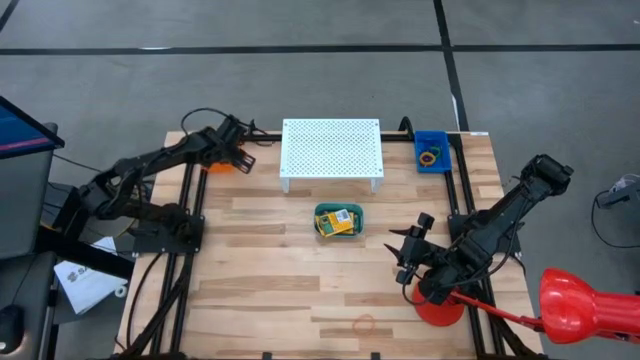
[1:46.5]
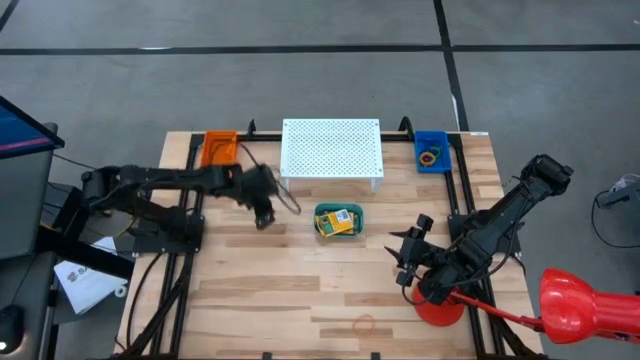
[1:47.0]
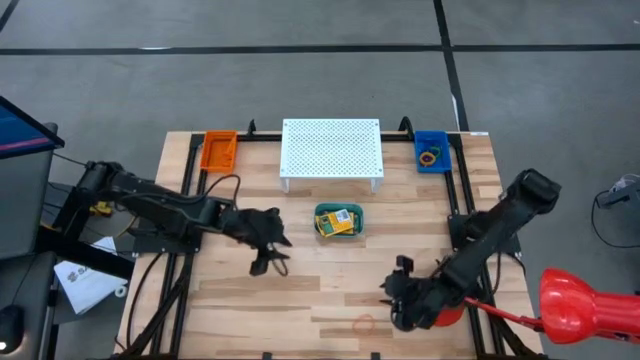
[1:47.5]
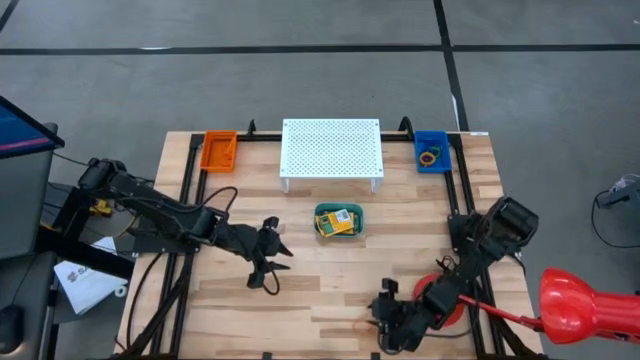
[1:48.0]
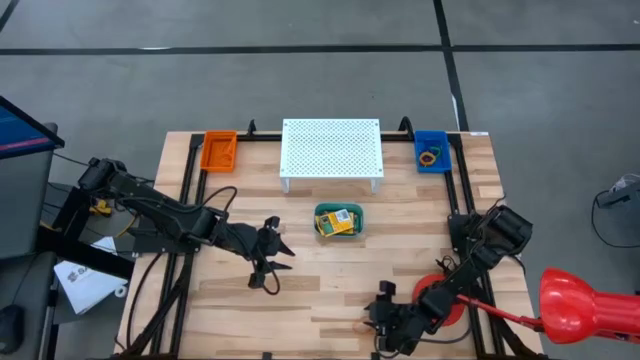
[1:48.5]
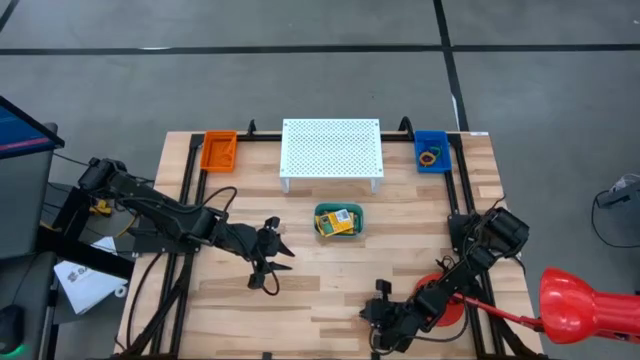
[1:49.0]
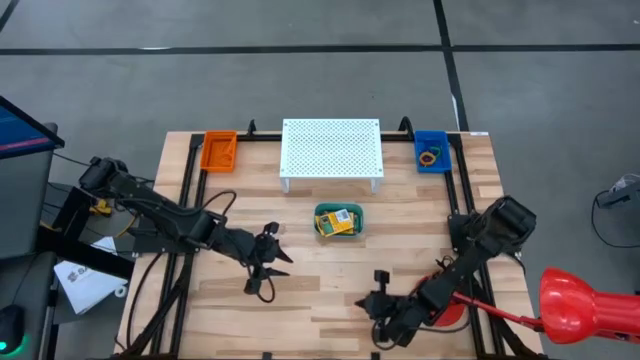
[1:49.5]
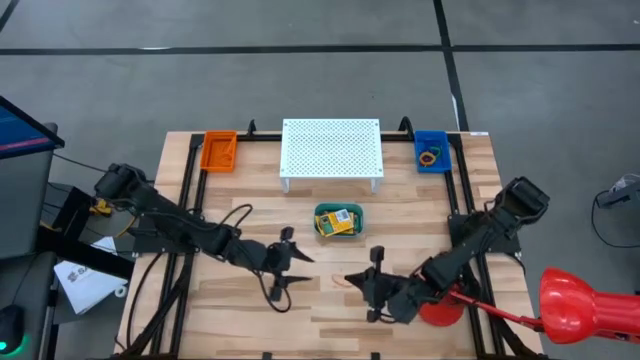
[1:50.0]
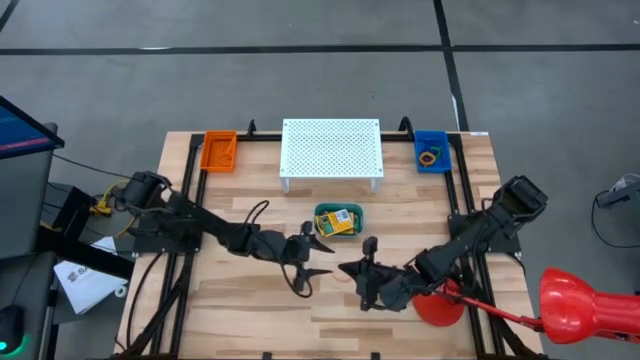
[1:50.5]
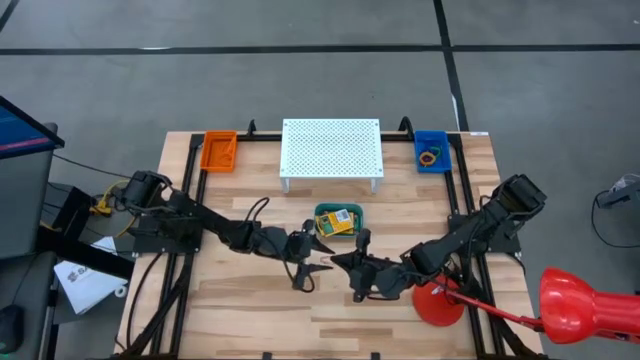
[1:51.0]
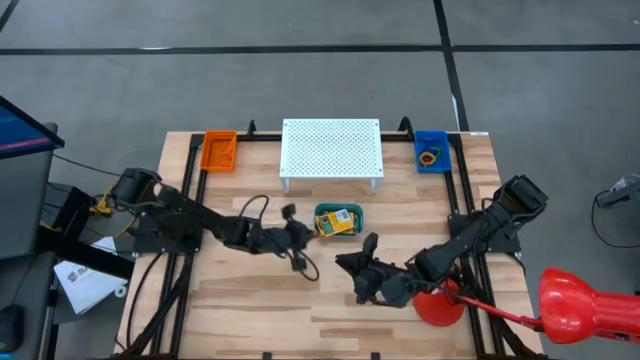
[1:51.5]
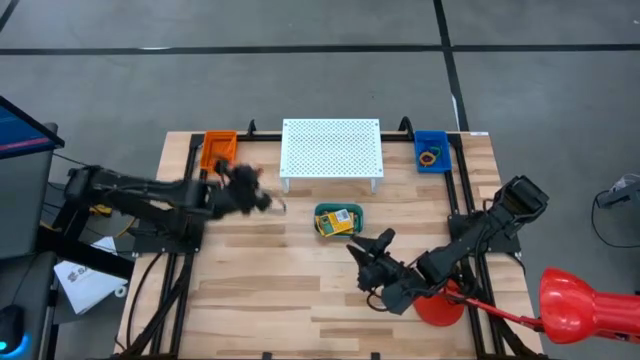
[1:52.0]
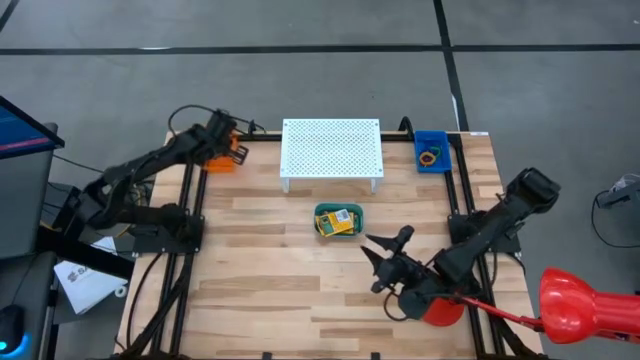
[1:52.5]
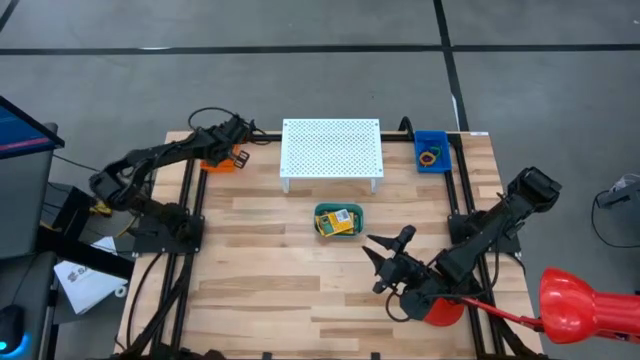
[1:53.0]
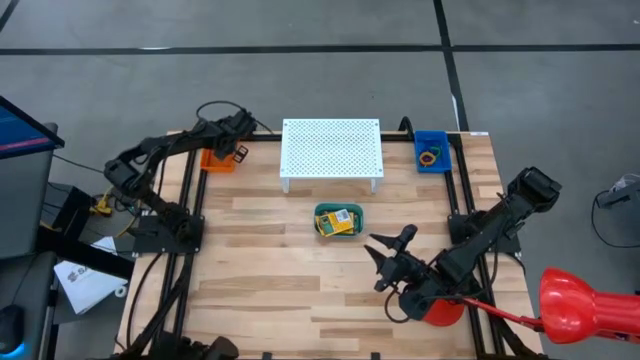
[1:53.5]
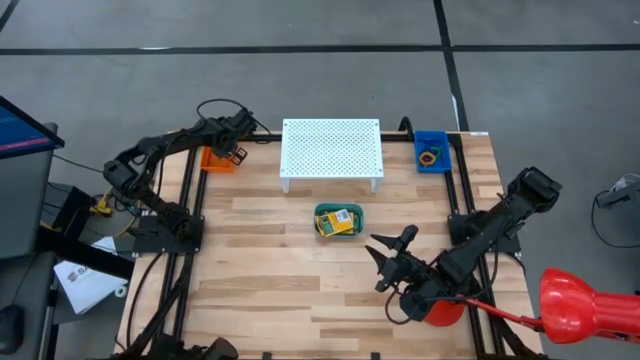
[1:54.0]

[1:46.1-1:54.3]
Task: Pick & Place Office Desk Supplies
Put the orange rubber band into the orange bin

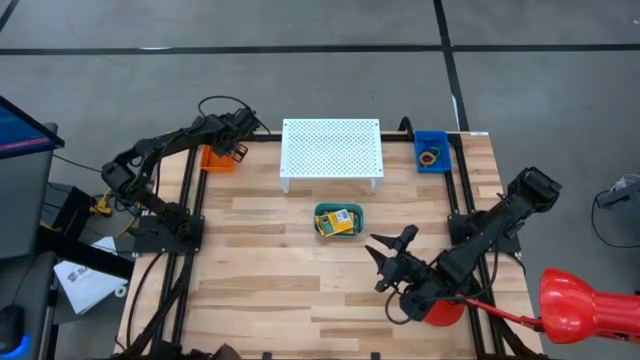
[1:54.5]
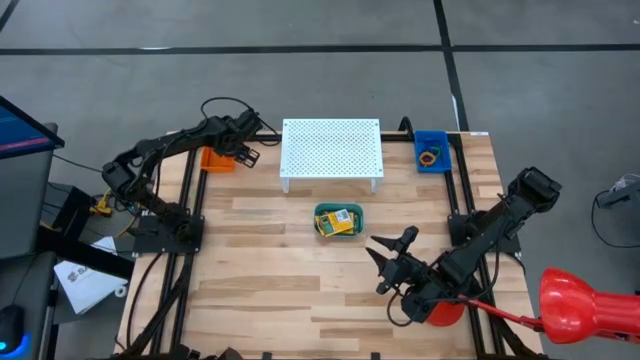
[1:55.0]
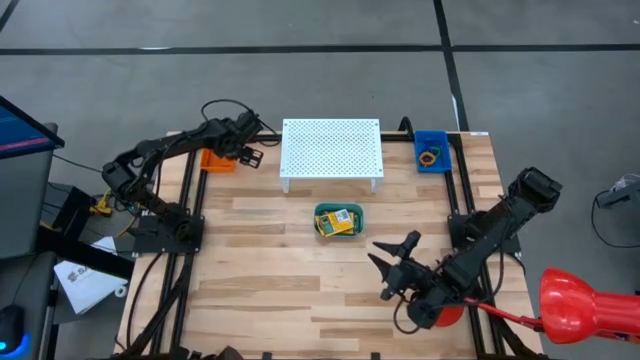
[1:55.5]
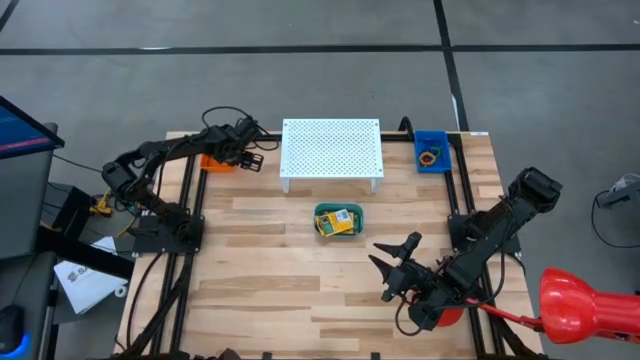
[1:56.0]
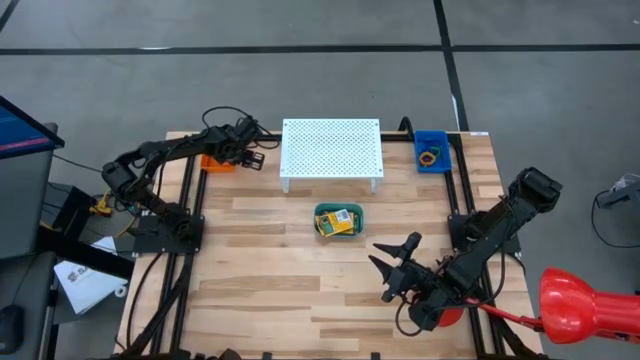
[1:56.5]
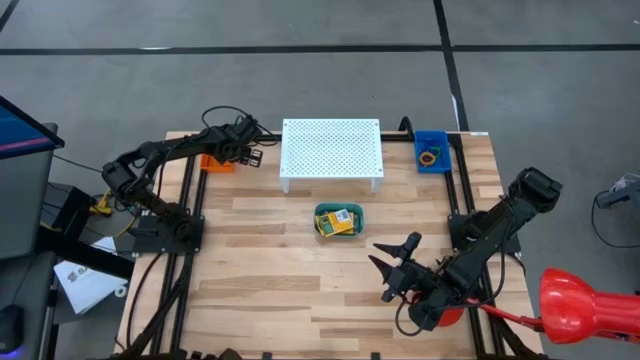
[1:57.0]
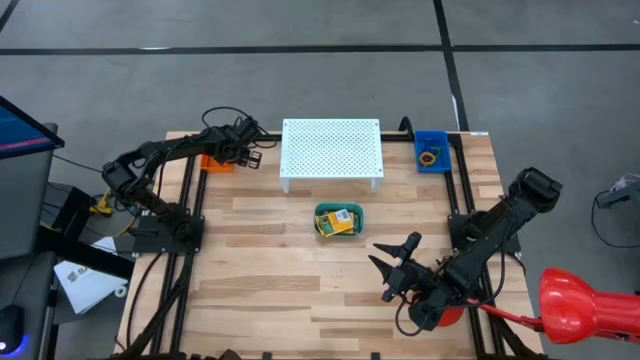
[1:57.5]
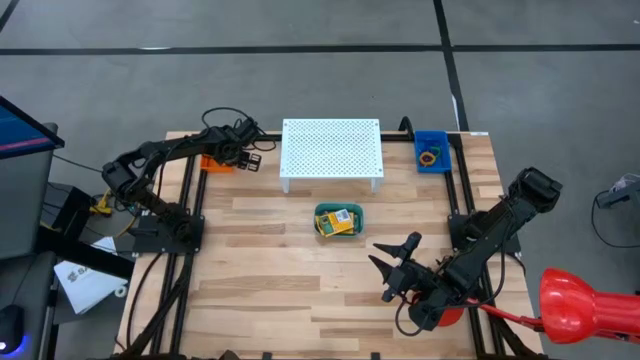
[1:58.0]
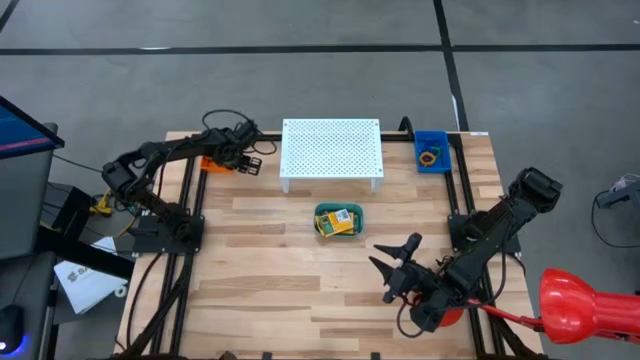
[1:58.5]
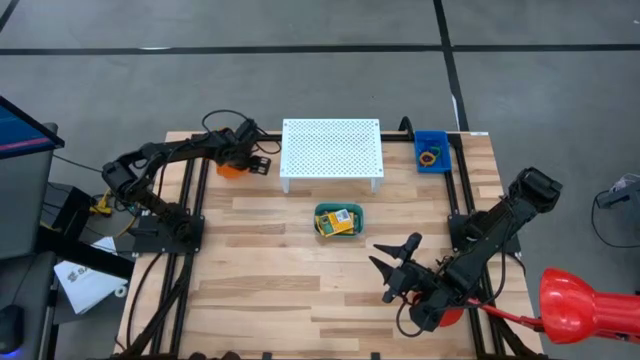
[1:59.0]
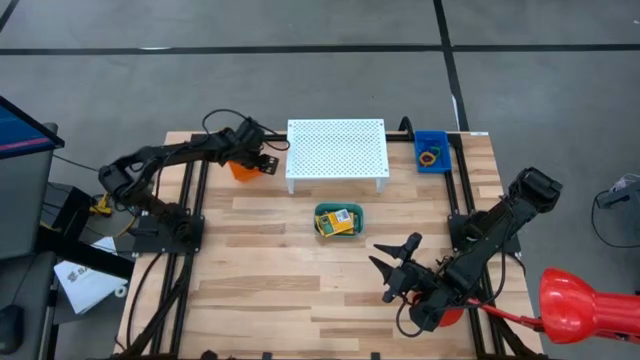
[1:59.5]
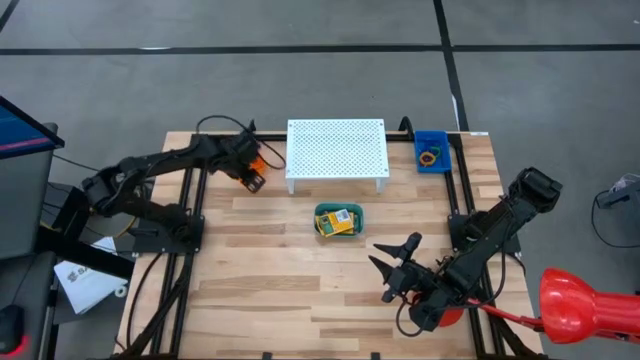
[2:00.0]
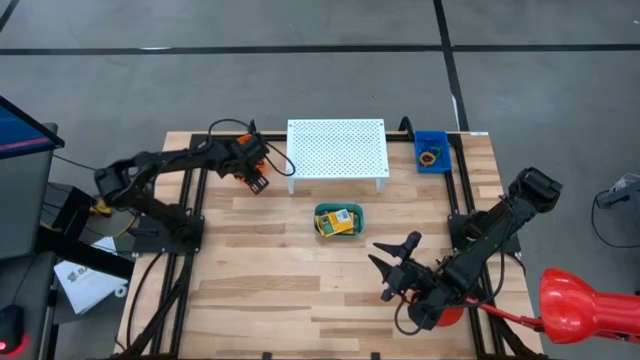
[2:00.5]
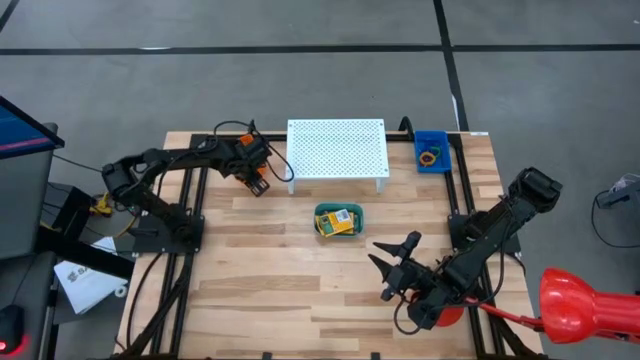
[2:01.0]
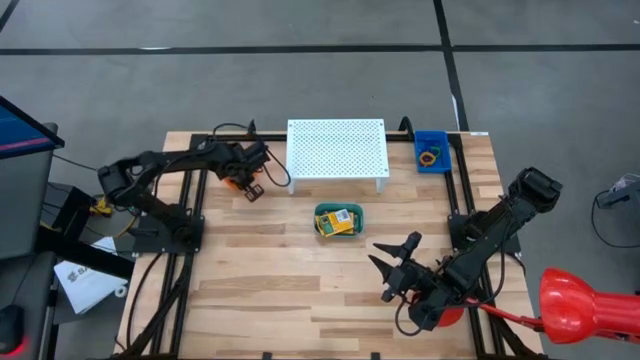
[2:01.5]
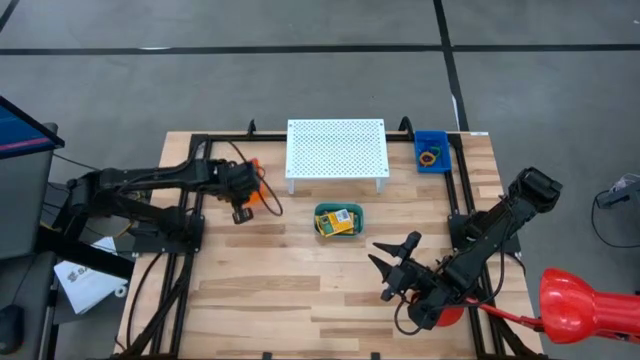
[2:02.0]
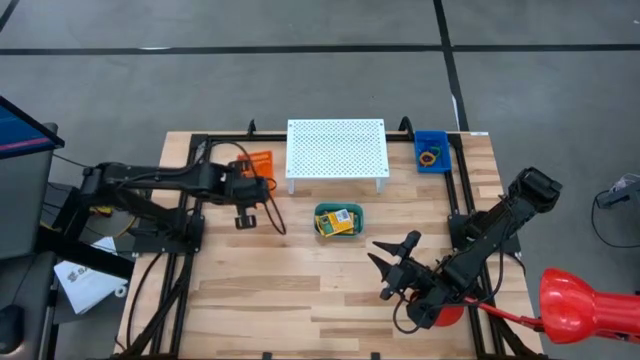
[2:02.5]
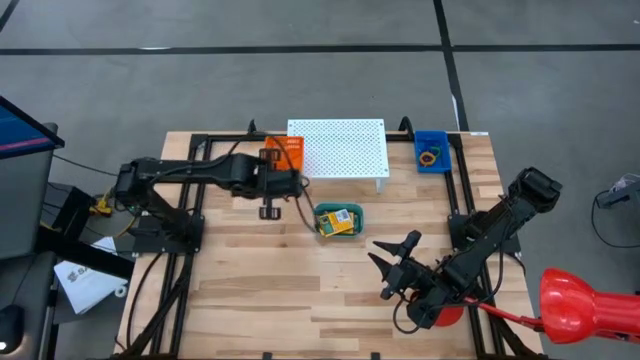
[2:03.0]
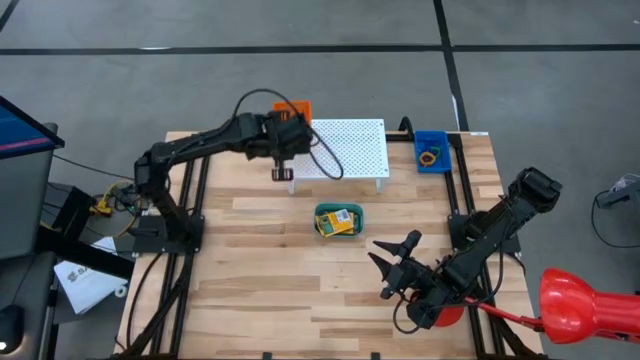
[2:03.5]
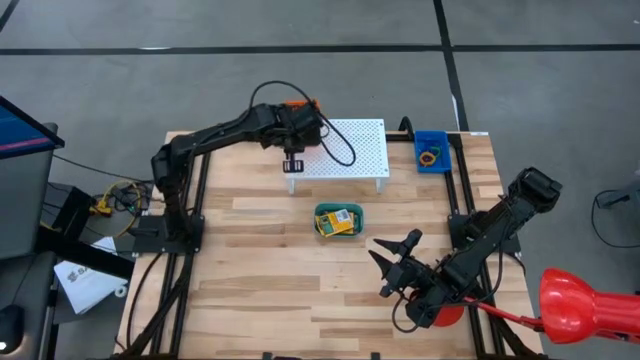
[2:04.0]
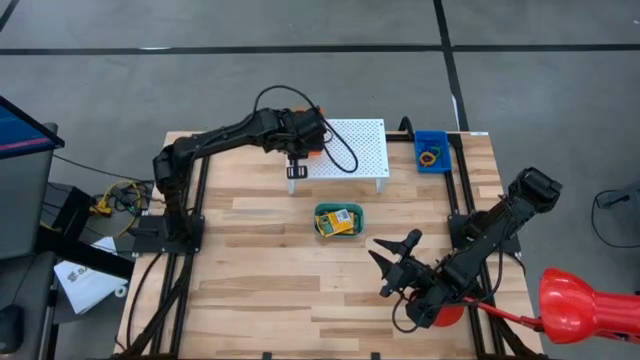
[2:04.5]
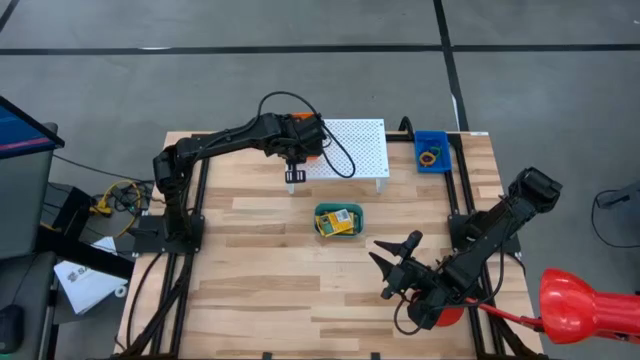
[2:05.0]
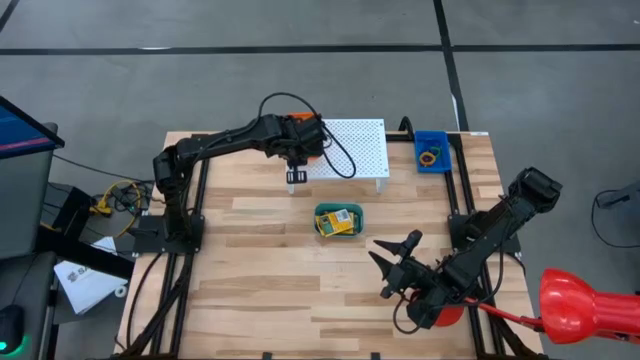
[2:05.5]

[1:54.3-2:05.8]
Put the orange bin on the shelf

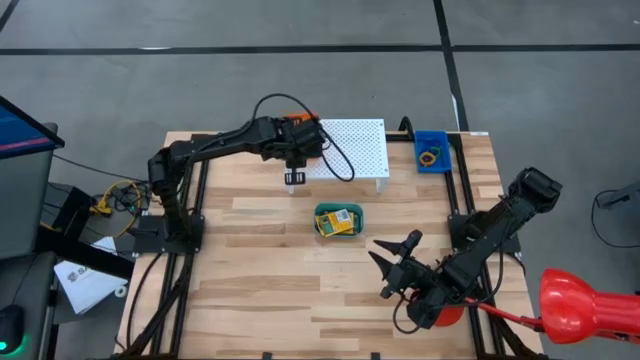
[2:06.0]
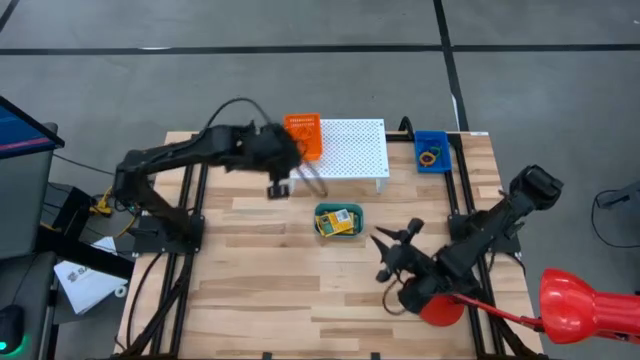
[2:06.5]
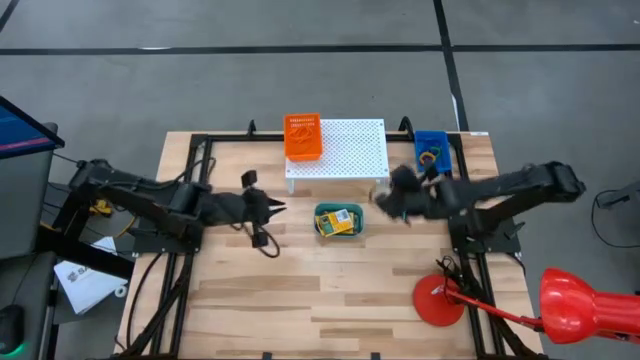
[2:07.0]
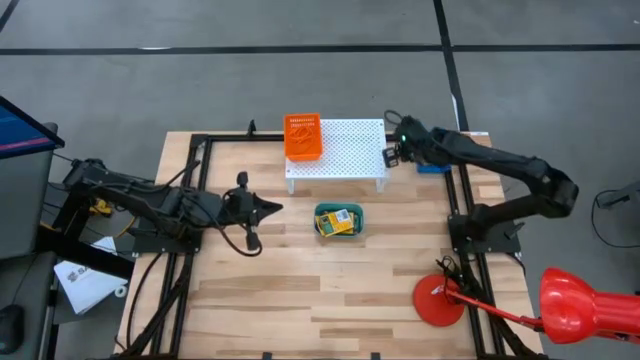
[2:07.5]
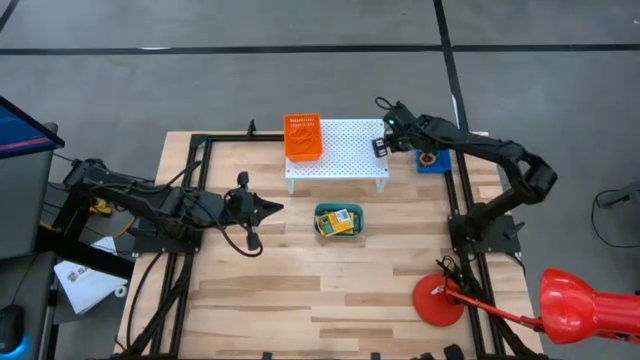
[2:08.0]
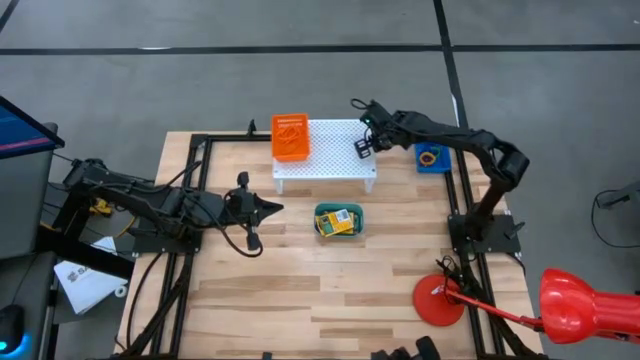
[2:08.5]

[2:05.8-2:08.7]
Adjust the shelf
